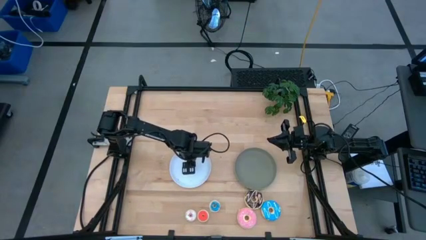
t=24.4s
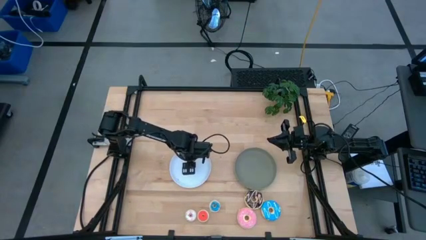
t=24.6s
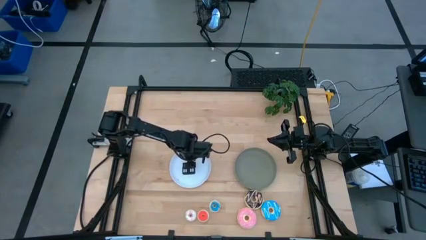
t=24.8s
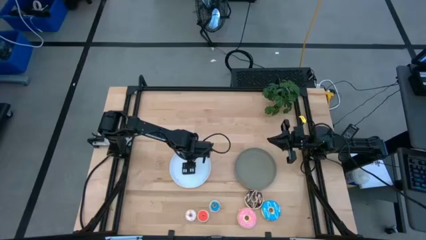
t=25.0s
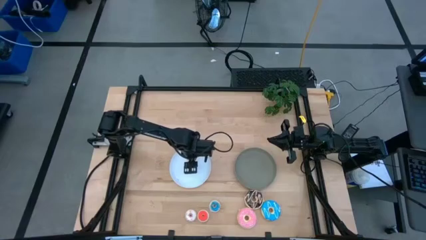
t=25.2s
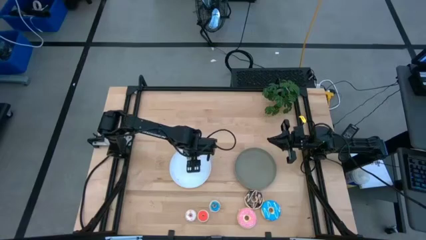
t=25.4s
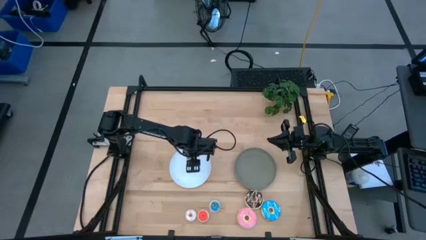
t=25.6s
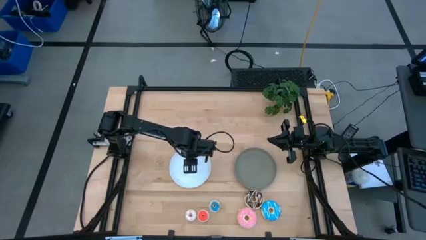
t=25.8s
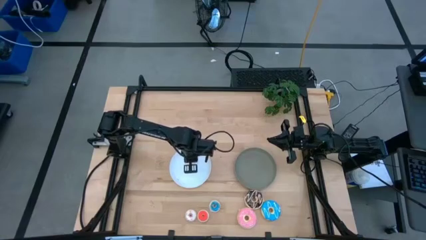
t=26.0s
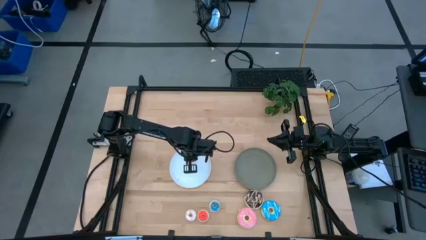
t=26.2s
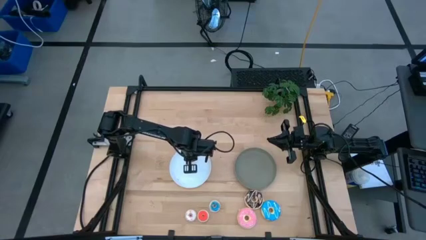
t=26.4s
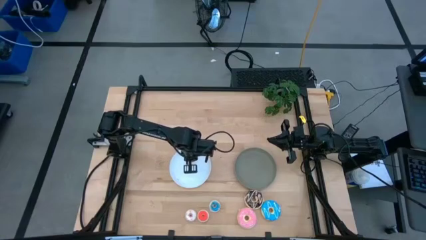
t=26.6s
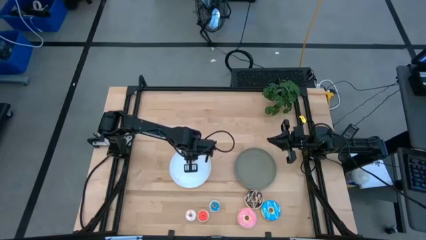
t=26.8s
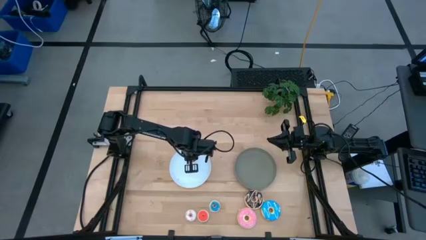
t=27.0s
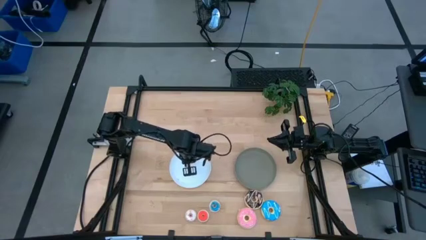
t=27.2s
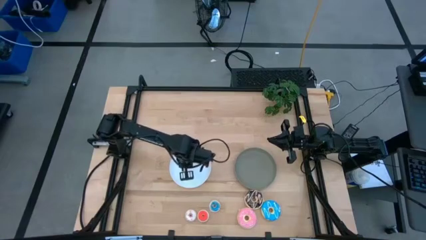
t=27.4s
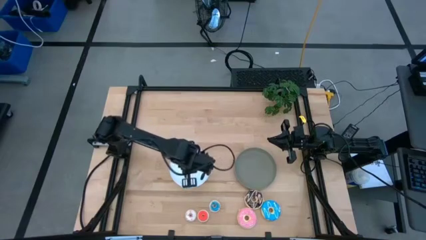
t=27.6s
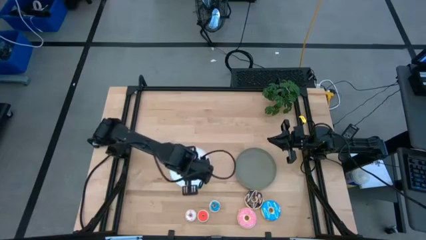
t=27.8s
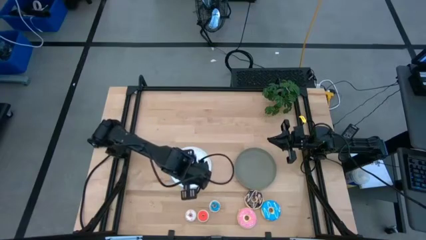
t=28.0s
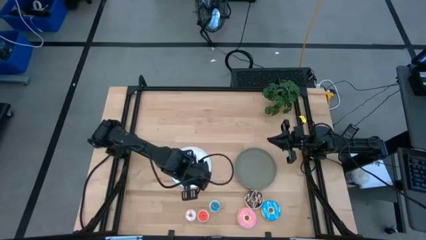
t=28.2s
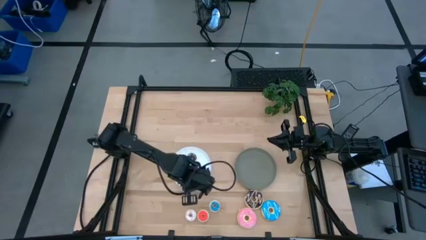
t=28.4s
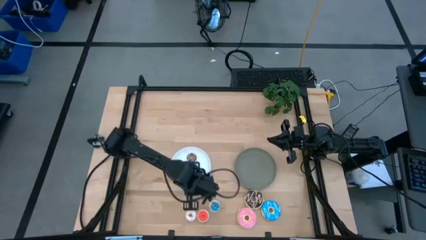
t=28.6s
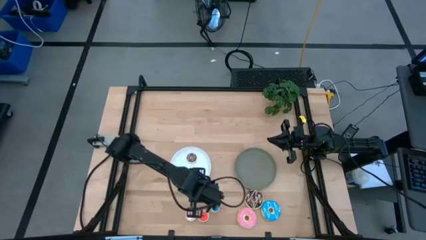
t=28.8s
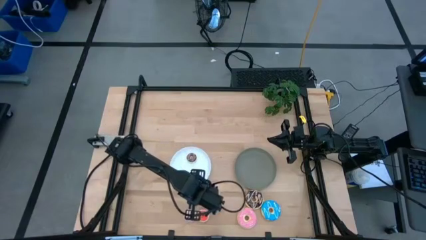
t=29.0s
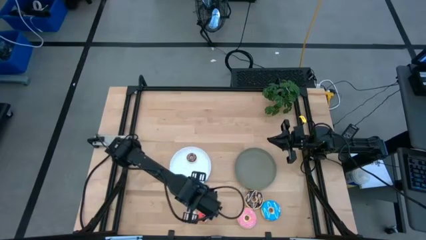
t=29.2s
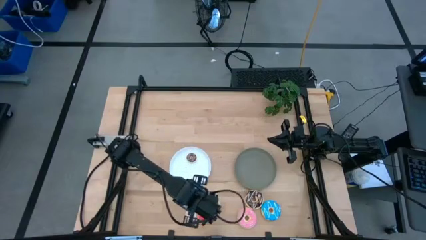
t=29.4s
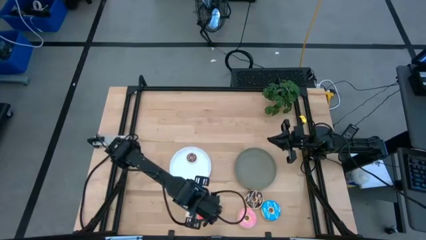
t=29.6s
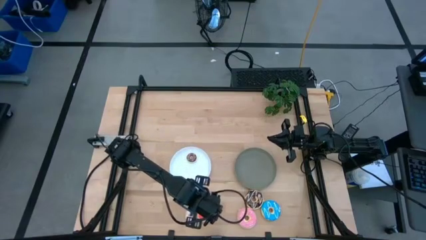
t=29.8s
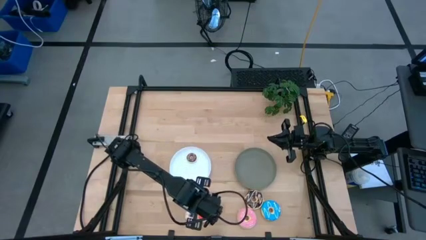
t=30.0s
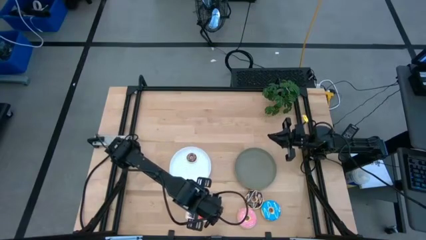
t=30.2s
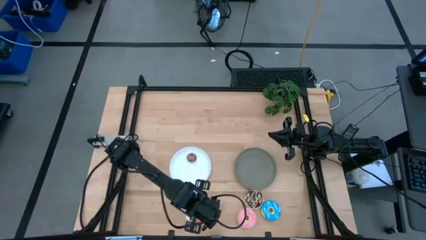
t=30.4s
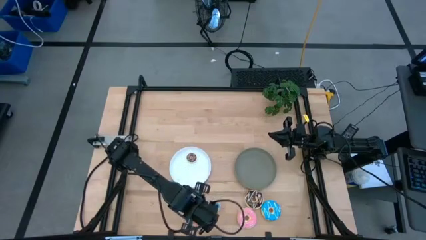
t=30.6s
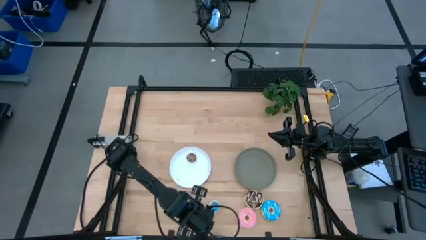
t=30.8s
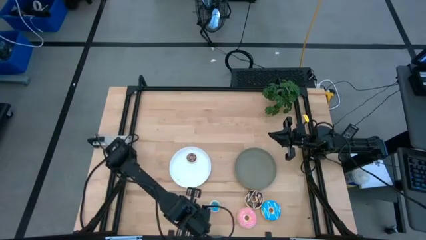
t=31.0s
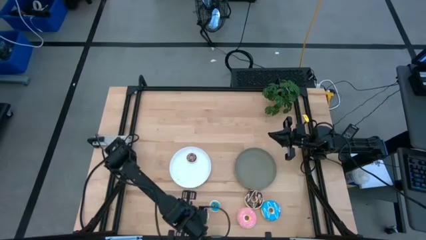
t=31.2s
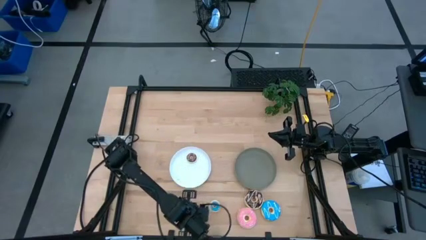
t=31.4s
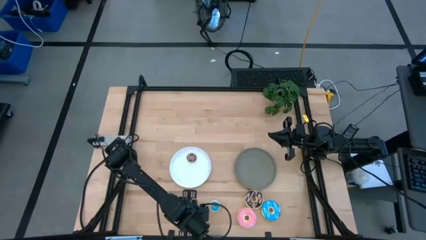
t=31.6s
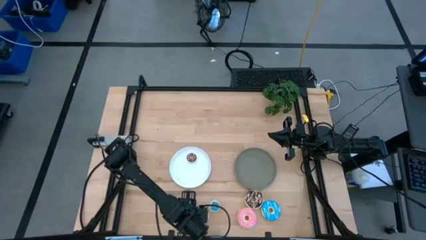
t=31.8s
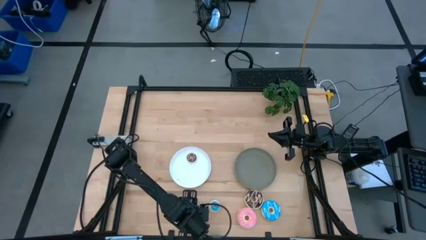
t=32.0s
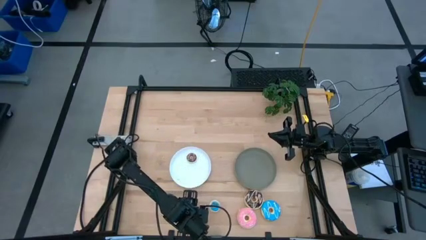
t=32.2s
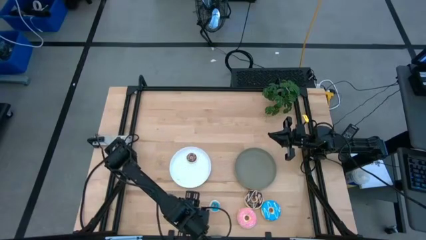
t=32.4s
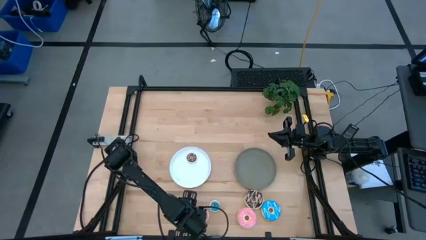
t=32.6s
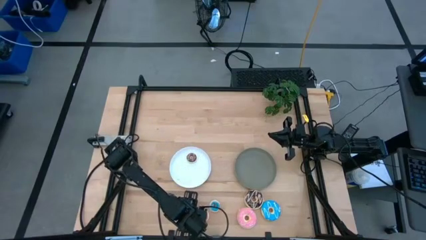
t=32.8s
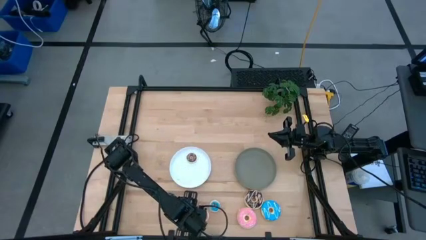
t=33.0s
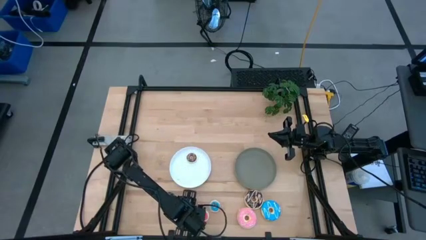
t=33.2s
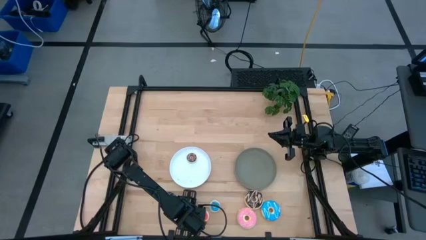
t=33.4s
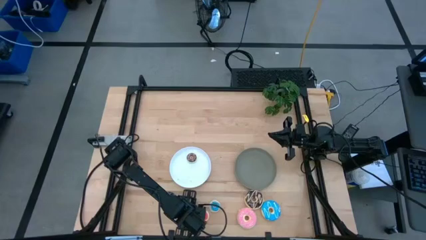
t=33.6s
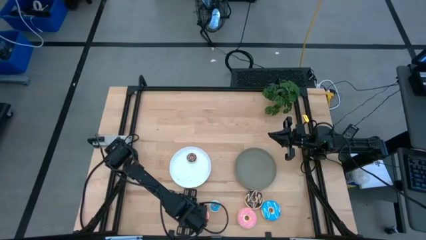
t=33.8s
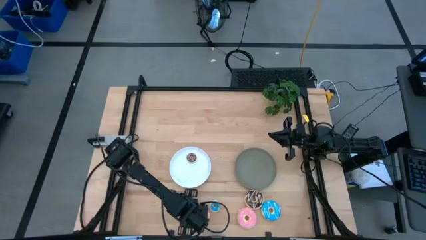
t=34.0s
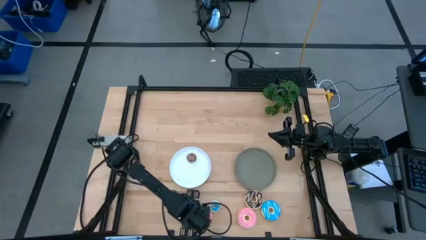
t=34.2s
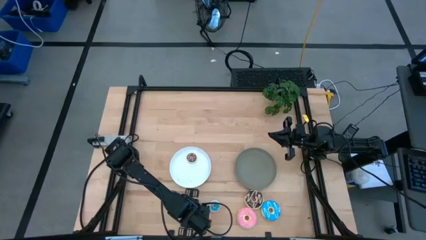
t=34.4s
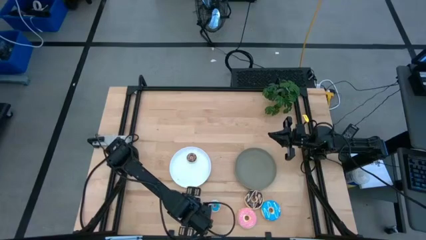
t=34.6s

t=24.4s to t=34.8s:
Task: Pick & Place donuts
Put the small white donut on the white plate

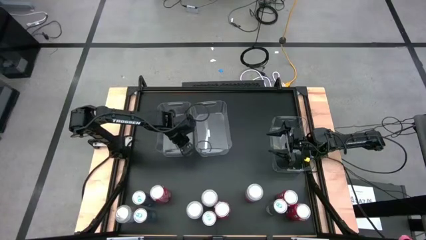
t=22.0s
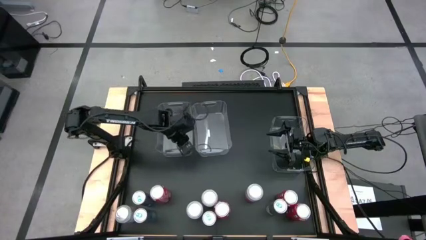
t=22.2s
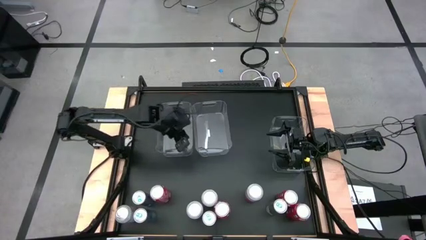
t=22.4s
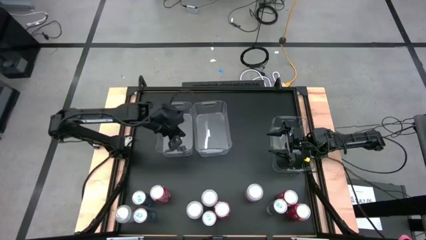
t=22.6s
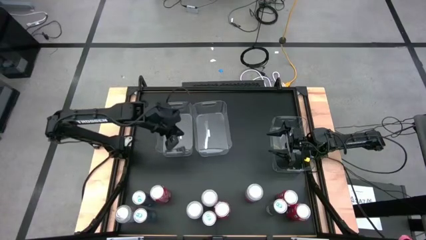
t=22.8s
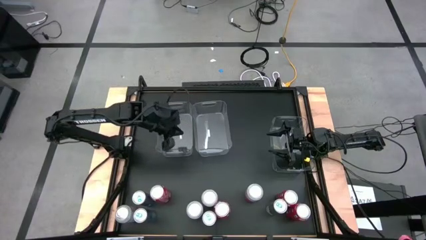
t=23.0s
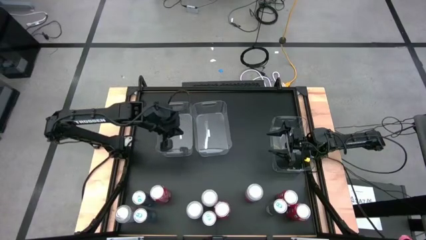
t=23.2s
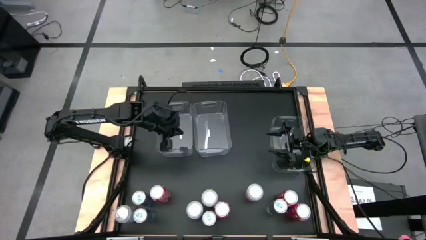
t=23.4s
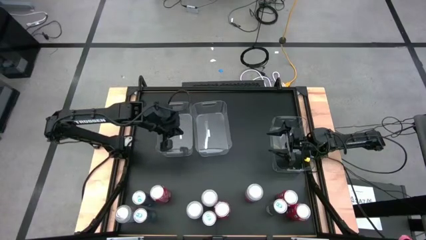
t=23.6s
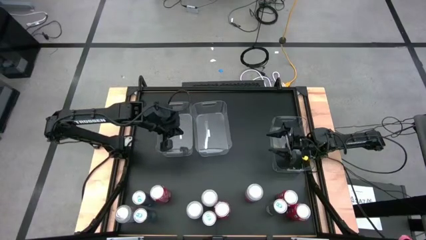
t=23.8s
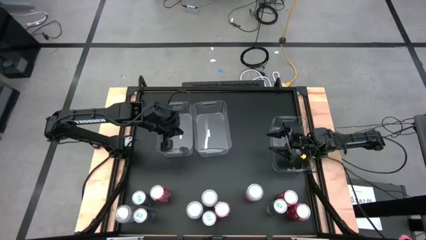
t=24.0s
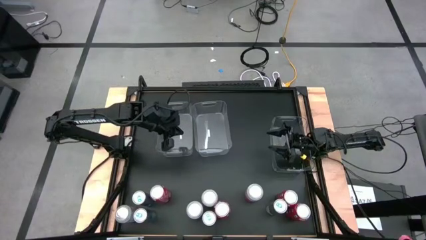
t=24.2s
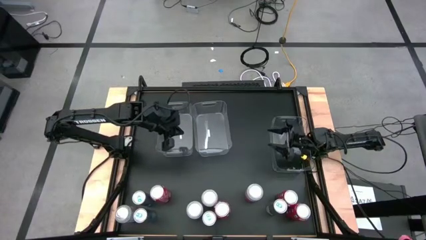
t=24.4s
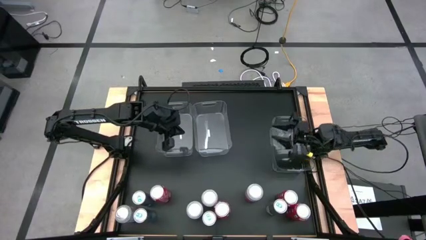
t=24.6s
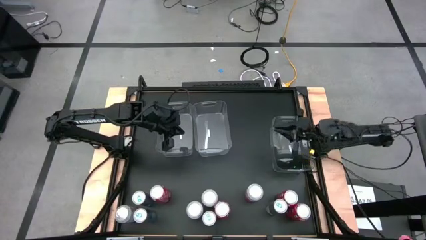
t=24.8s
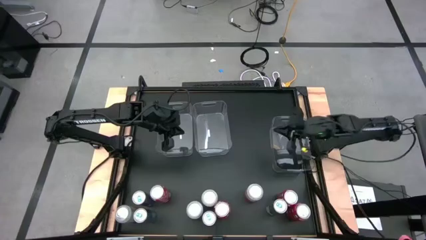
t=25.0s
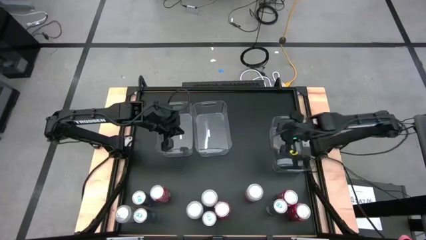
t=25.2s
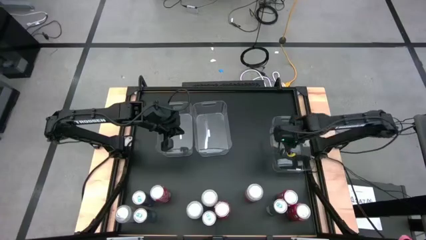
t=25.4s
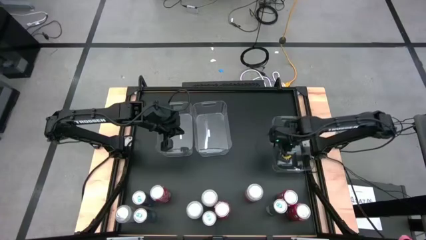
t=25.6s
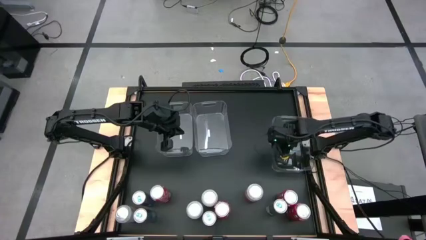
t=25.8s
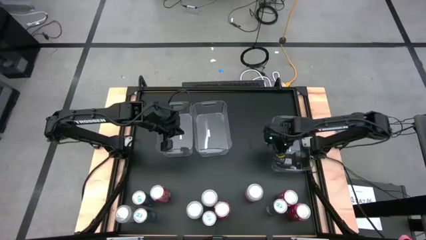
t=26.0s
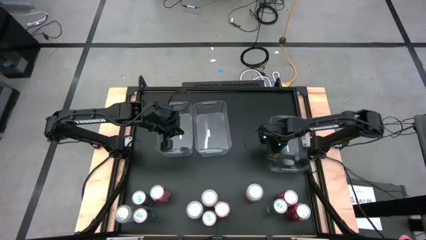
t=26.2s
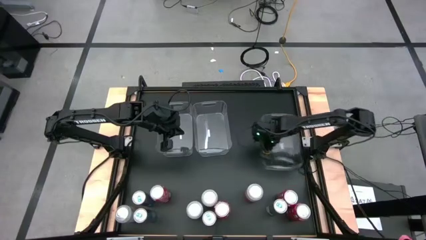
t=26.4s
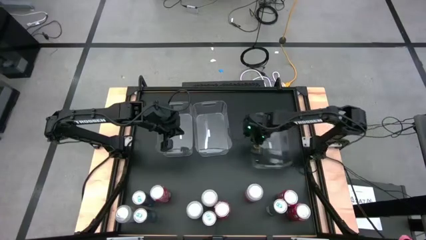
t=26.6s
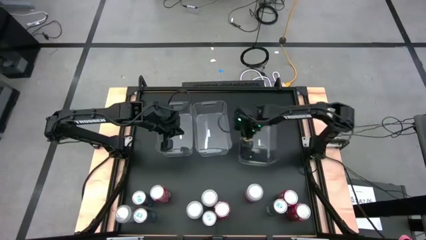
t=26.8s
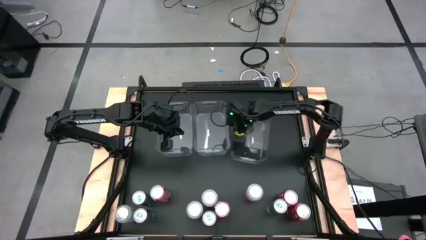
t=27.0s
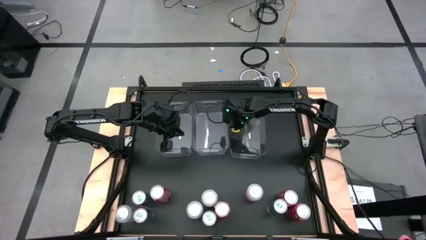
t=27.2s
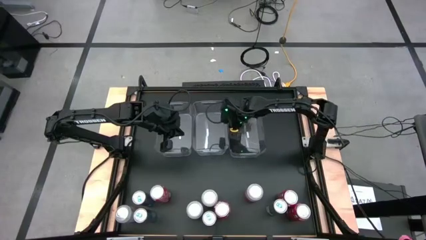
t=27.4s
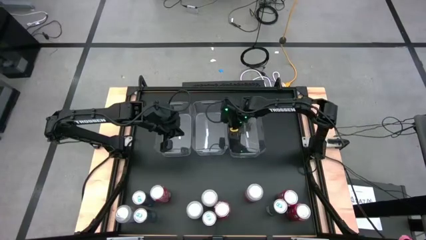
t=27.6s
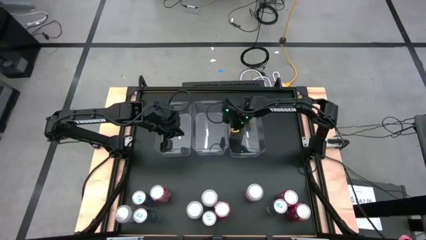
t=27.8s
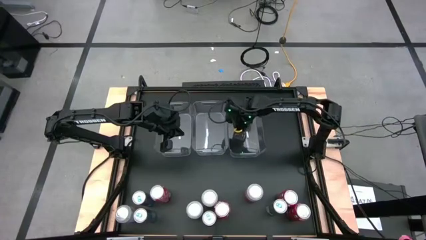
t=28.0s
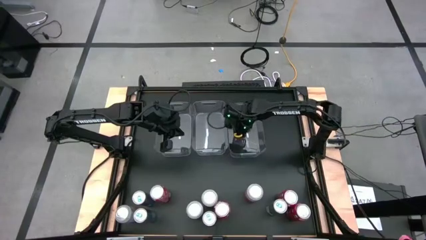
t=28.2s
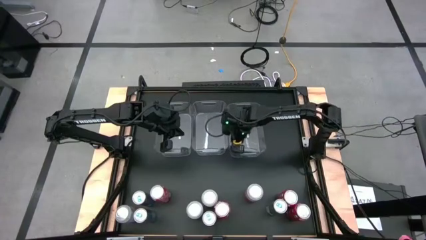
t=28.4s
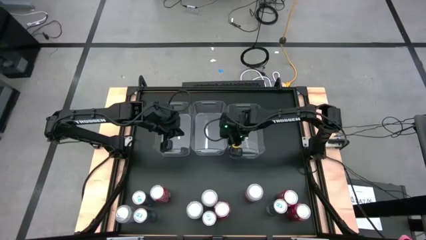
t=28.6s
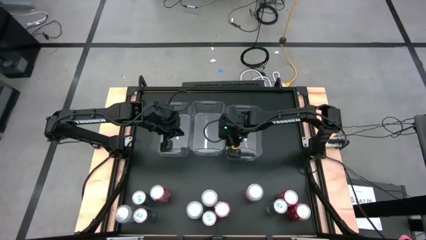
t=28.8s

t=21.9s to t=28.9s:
Task: Sort soda cans
Adjust the right transparent bin next to the center transparent bin
